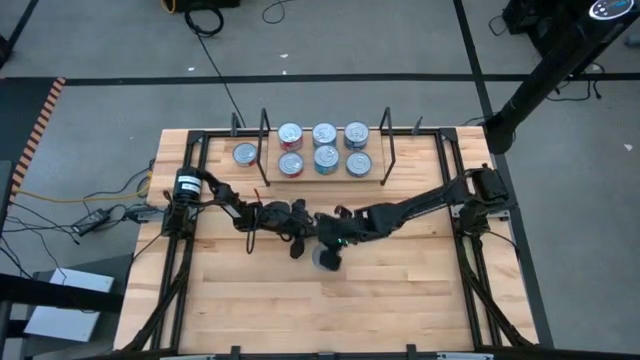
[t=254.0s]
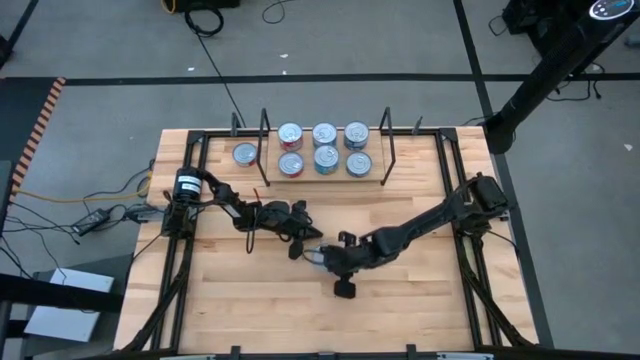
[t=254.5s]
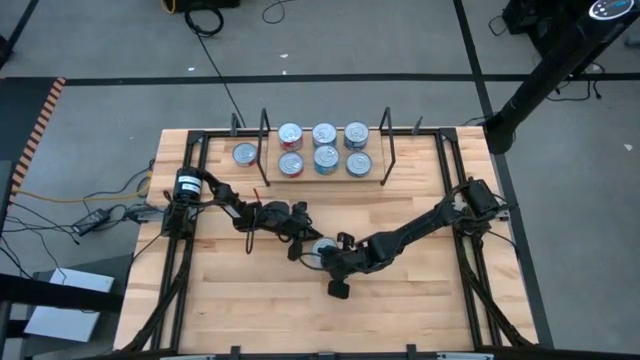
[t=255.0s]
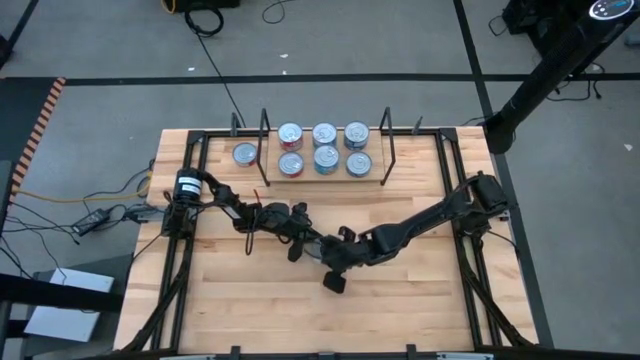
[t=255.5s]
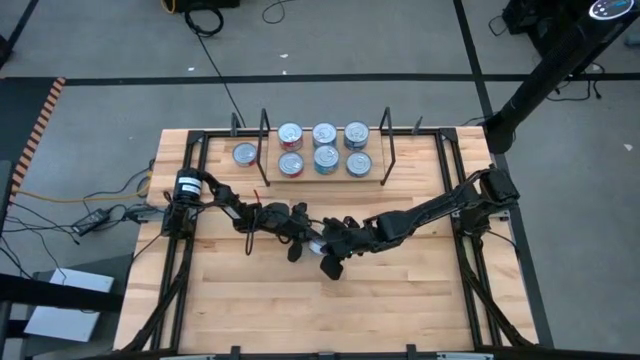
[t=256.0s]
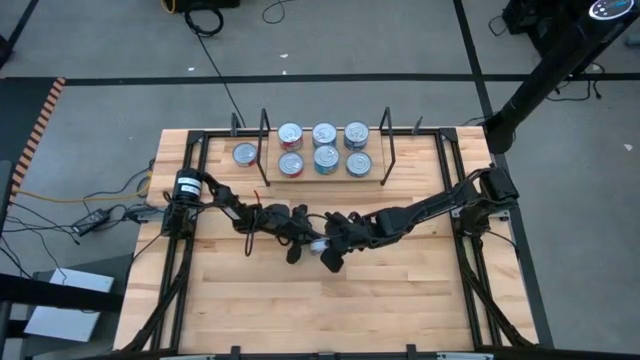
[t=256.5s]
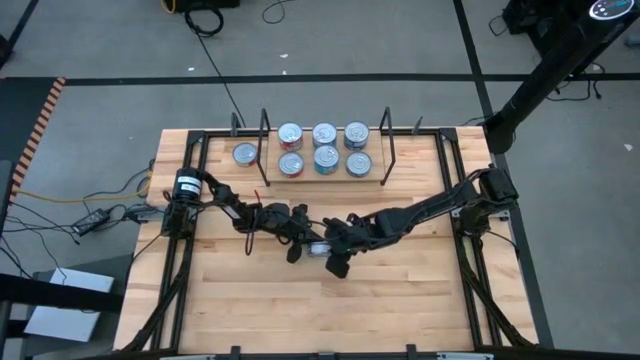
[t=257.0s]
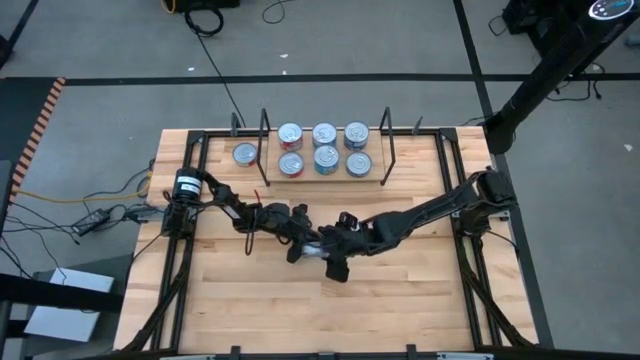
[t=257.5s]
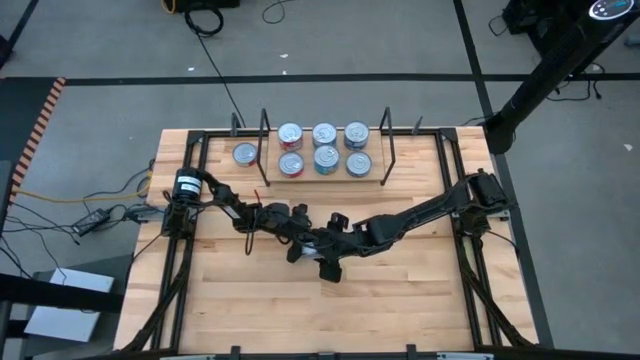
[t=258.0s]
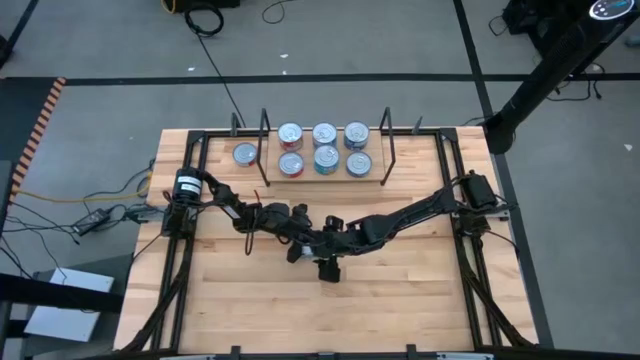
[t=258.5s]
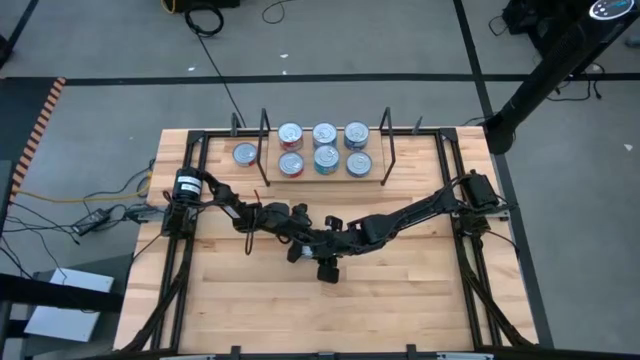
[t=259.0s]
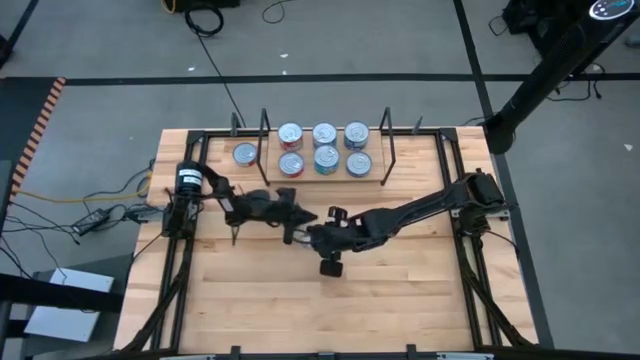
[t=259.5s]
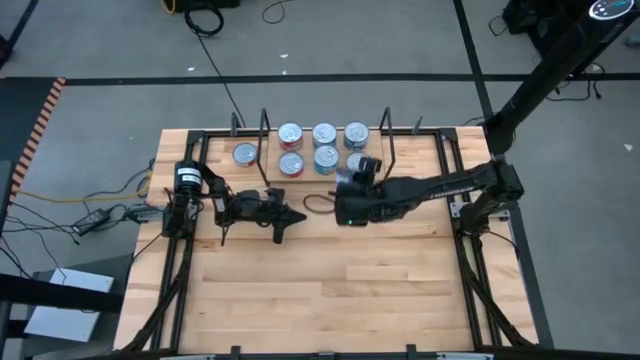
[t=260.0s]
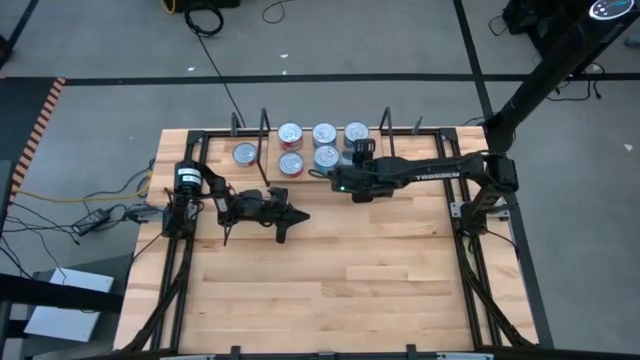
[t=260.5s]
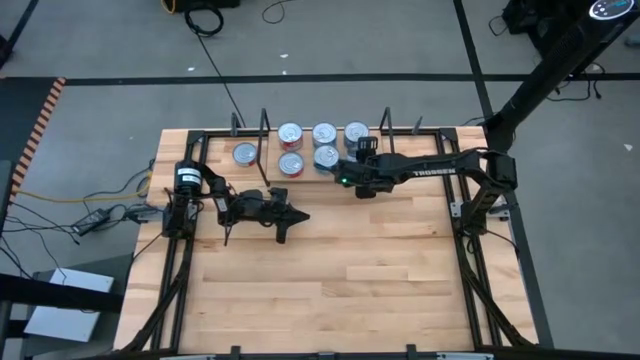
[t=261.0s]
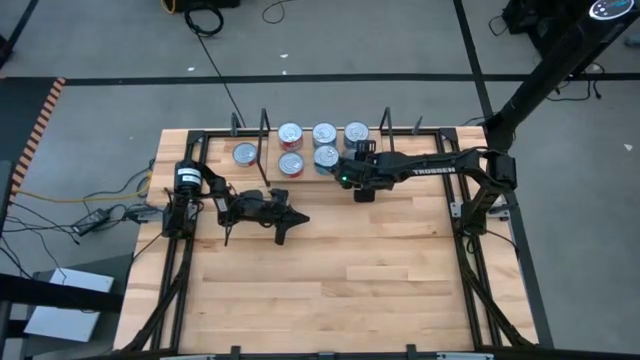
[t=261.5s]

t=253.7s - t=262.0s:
Task: Stack canned seafood by type on shelf
Stack the blue tuna can on top of the other blue tuna can

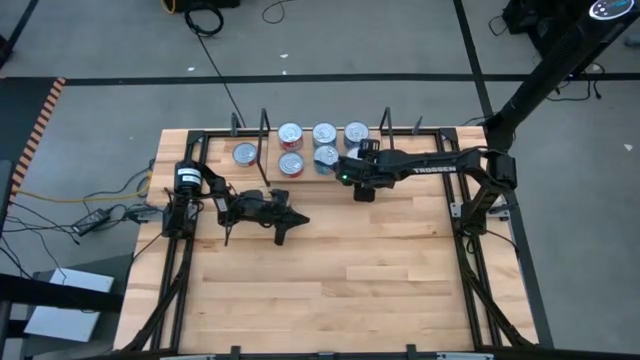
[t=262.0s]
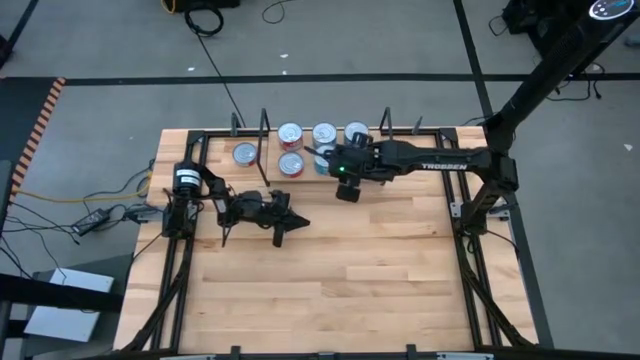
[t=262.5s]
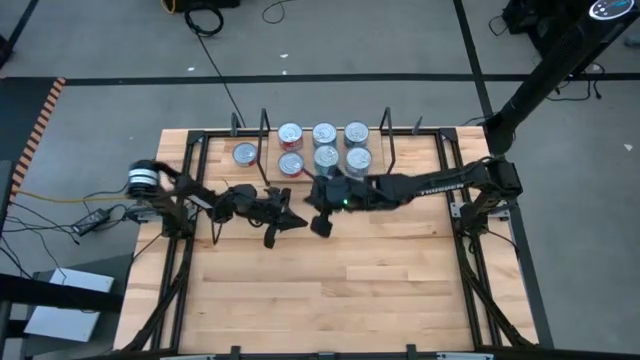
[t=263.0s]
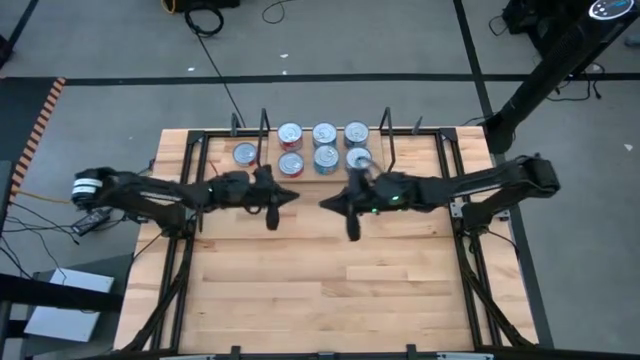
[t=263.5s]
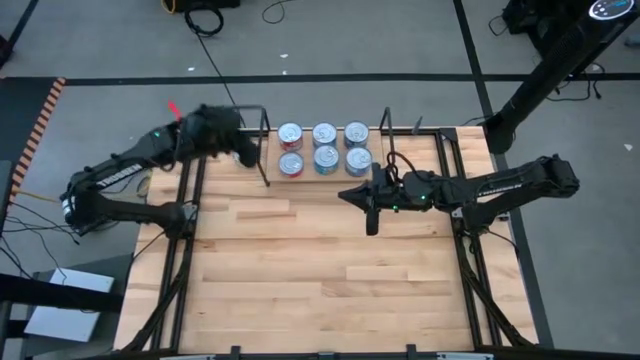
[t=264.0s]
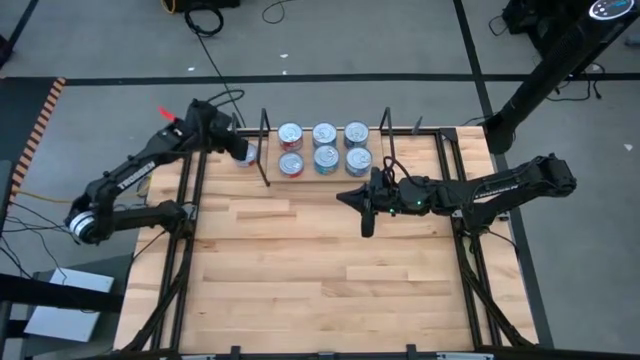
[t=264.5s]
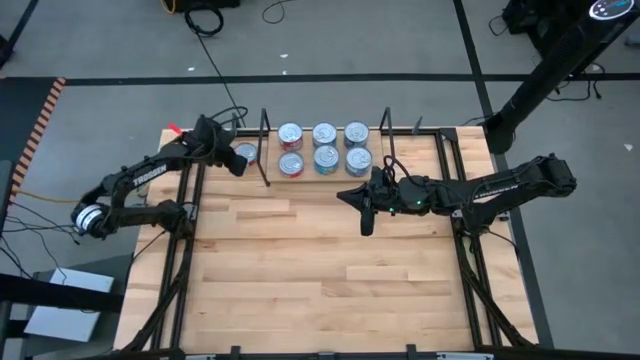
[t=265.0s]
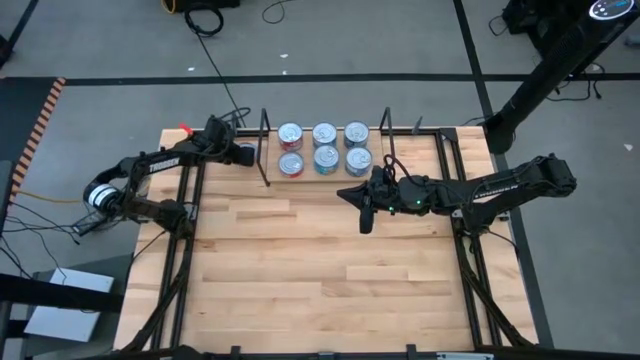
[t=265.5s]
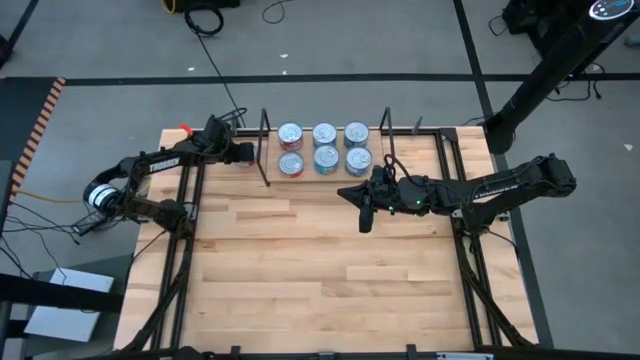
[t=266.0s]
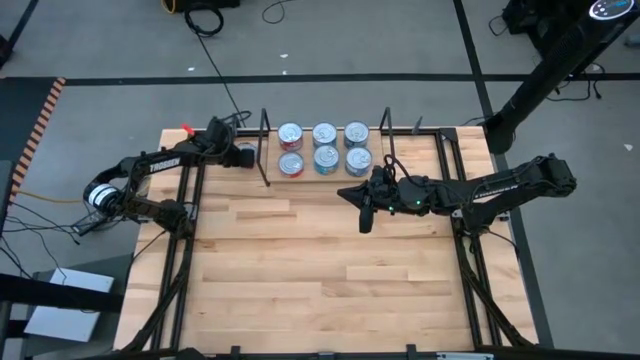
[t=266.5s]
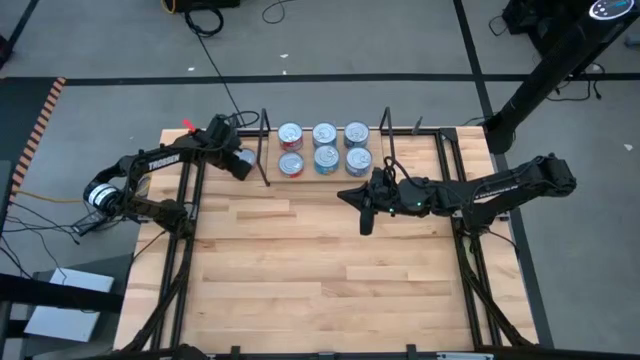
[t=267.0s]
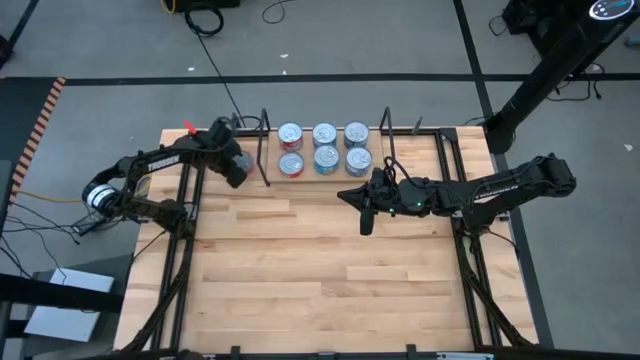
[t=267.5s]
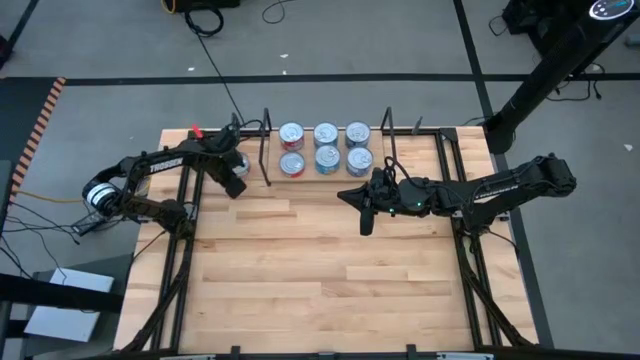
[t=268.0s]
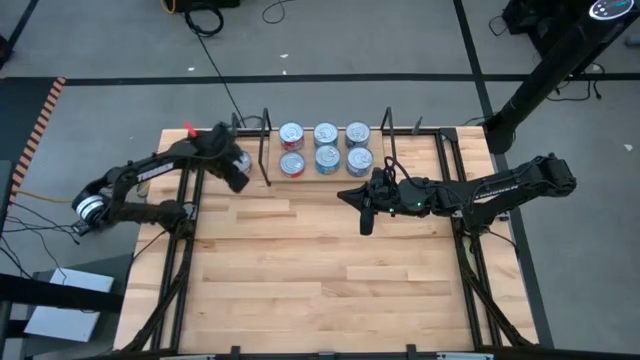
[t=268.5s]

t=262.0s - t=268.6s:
Stack the red tuna can on top of the other red tuna can

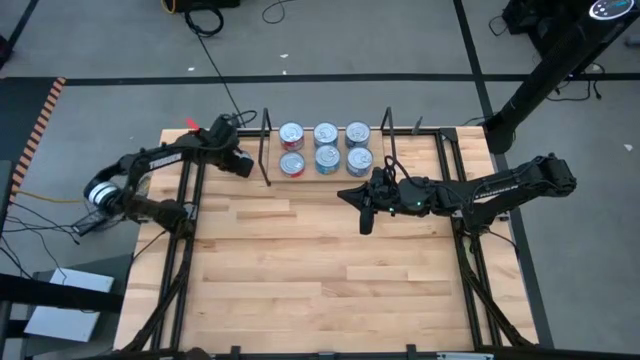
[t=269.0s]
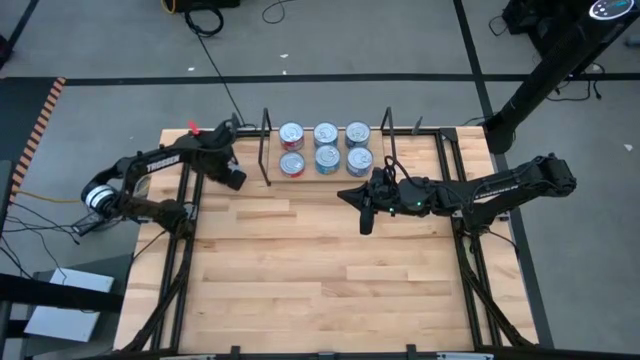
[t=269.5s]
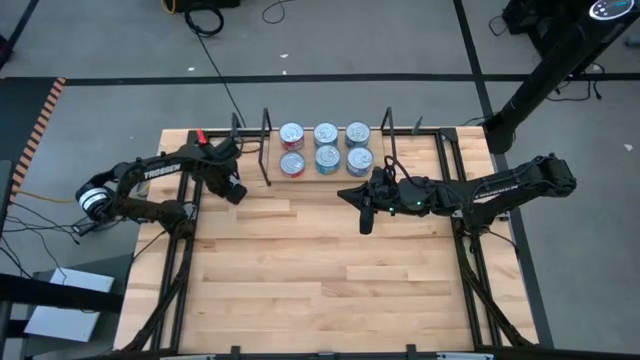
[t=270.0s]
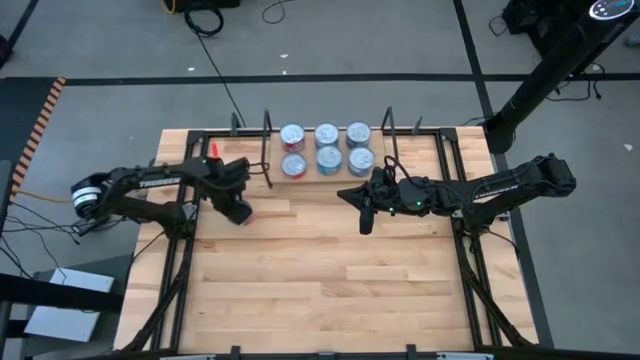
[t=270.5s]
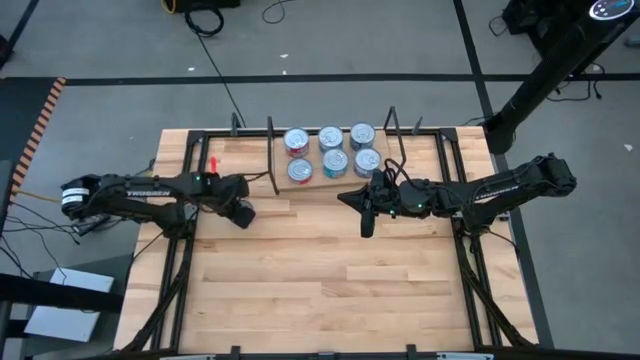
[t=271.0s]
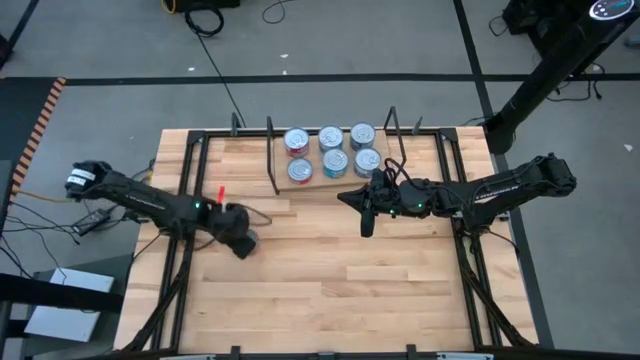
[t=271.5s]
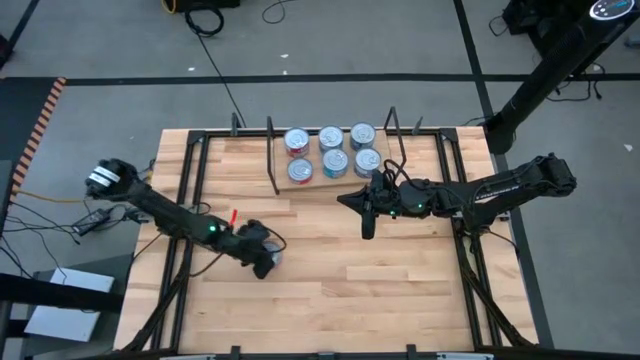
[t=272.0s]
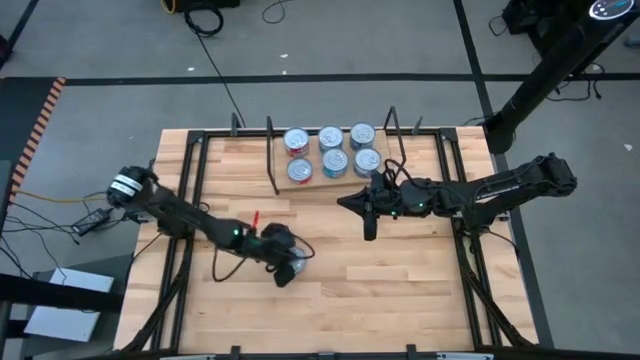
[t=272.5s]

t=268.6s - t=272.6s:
Move the red tuna can to the center of the table

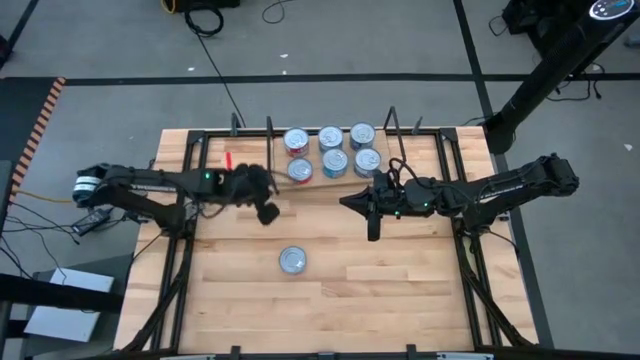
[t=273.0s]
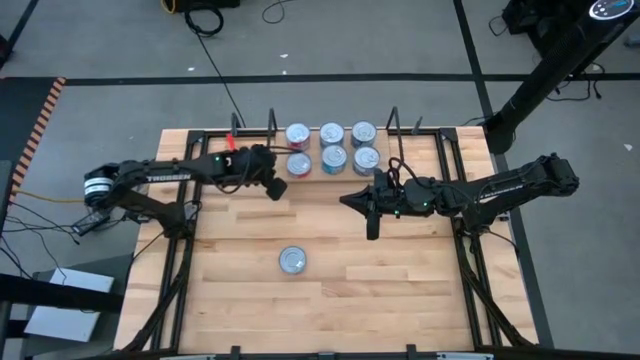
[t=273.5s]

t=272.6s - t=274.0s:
Adjust the shelf

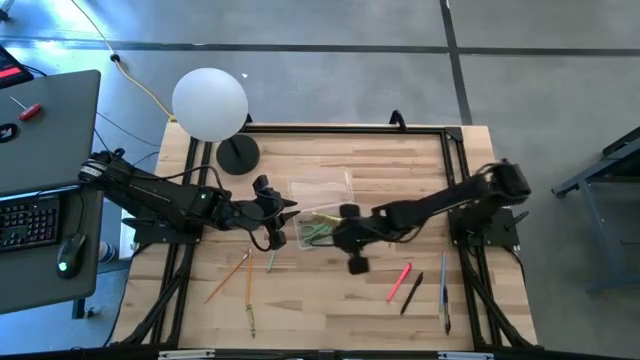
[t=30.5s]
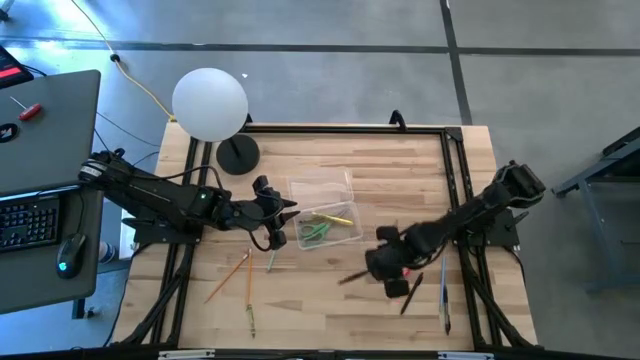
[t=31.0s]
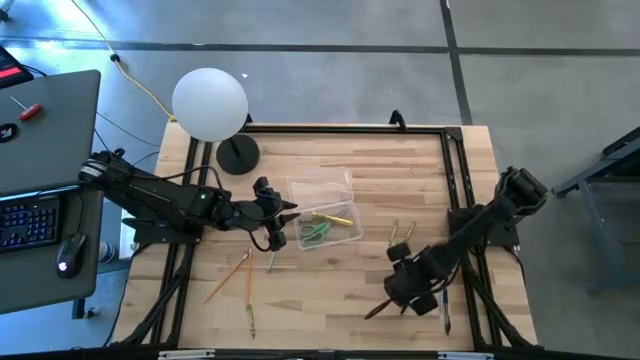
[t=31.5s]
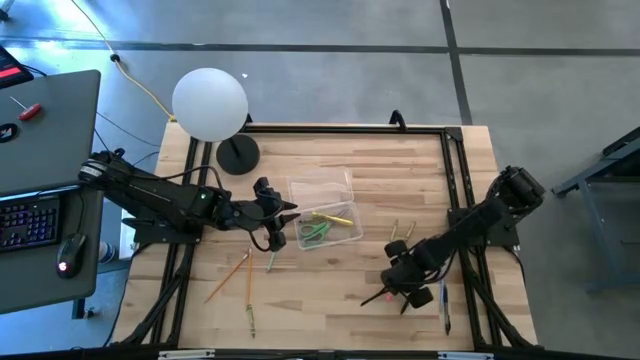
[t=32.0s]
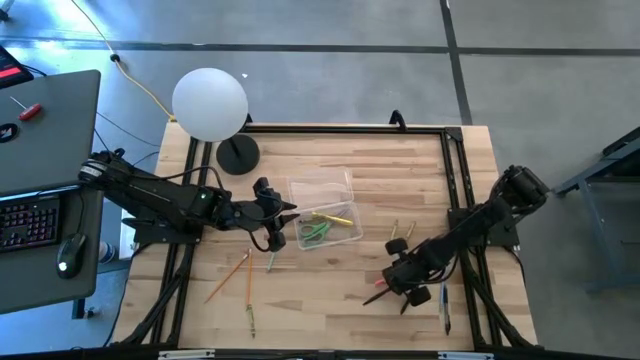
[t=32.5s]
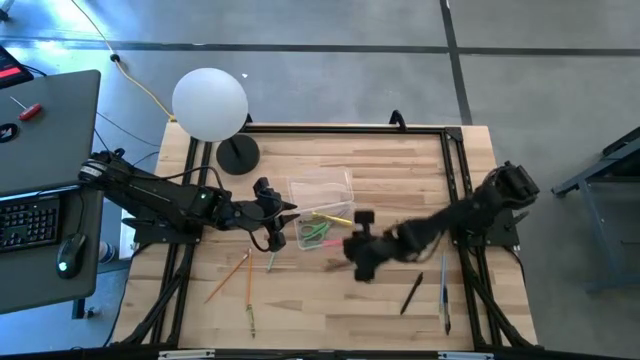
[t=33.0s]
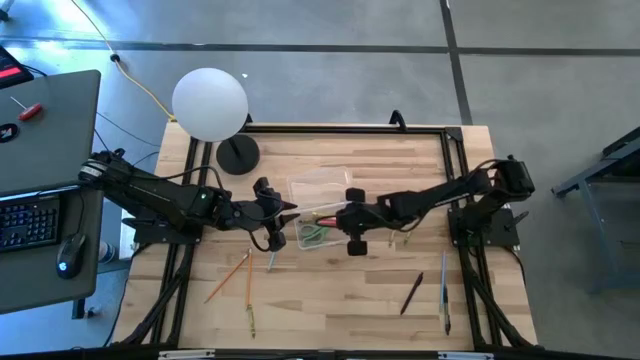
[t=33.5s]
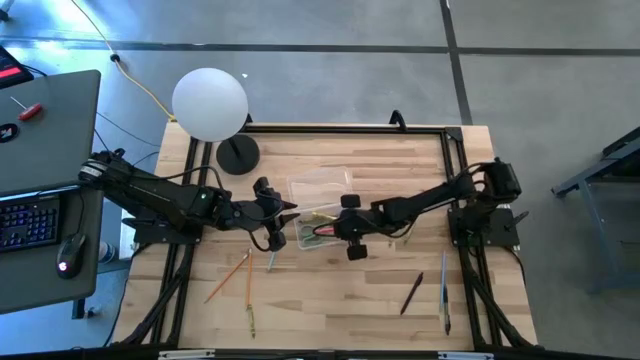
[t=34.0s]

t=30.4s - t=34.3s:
Task: Pick & place school supplies into a supply box
Put the pink pen into the transparent supply box
